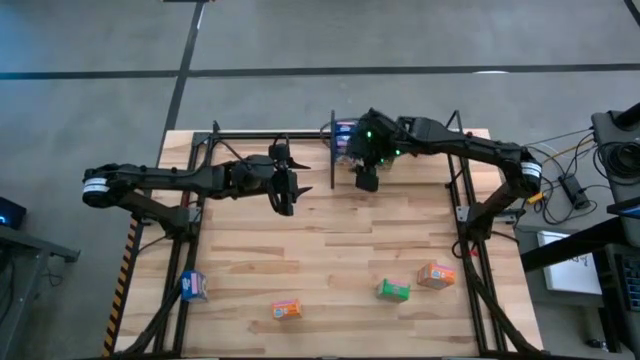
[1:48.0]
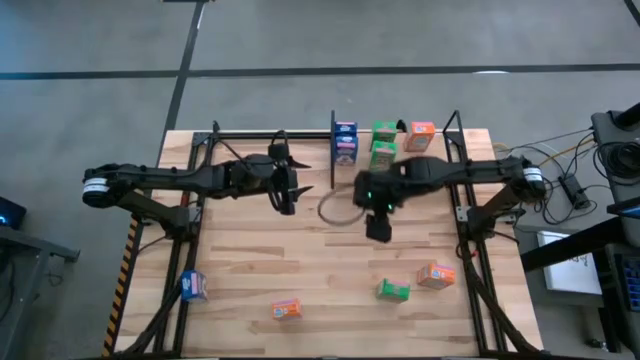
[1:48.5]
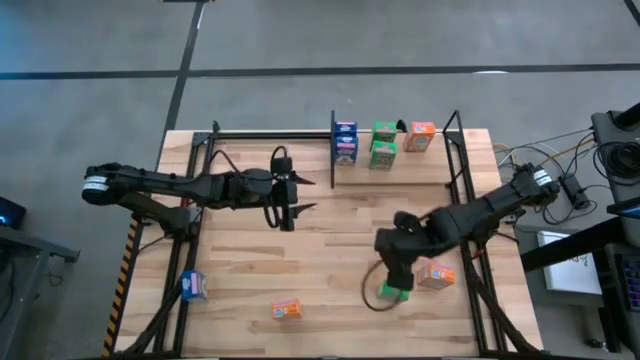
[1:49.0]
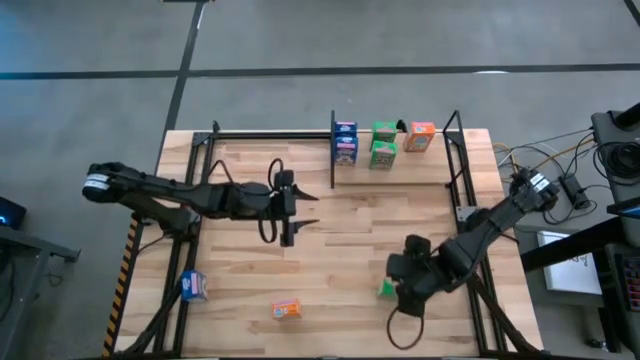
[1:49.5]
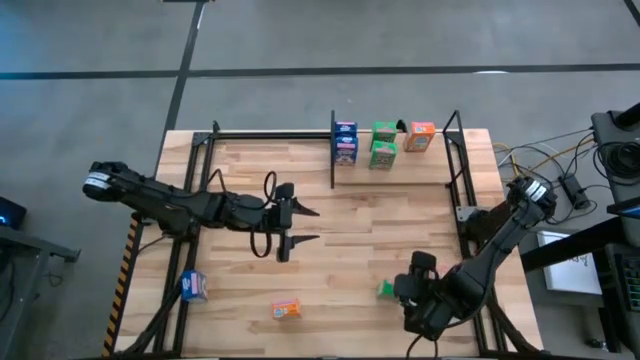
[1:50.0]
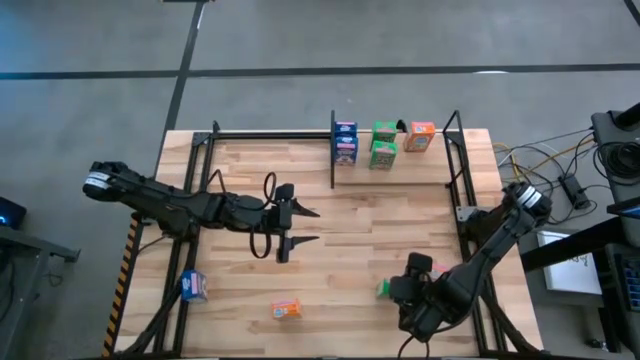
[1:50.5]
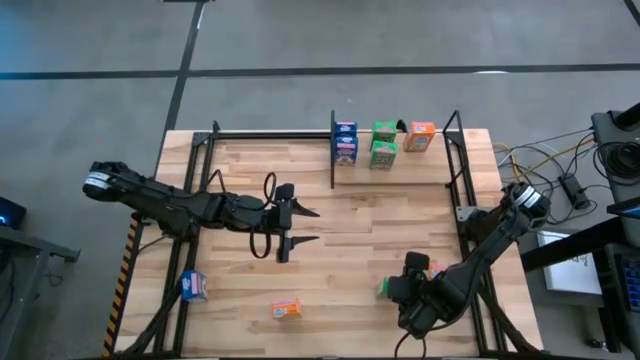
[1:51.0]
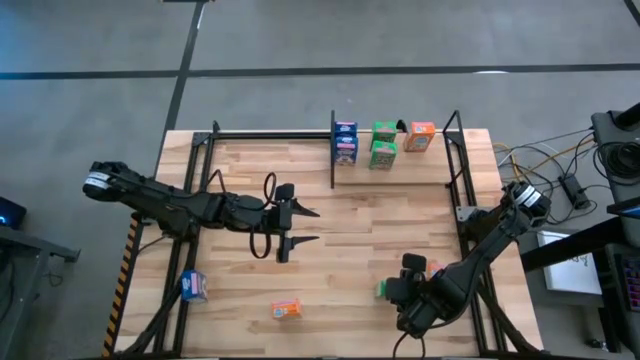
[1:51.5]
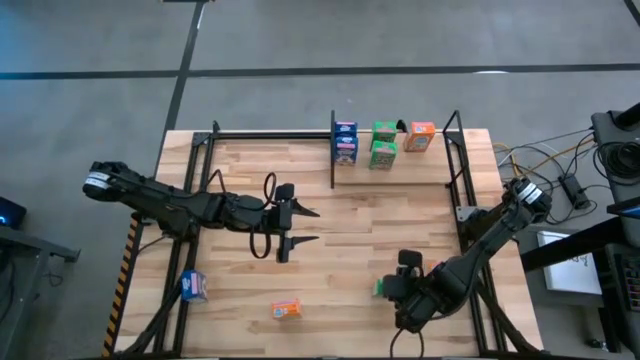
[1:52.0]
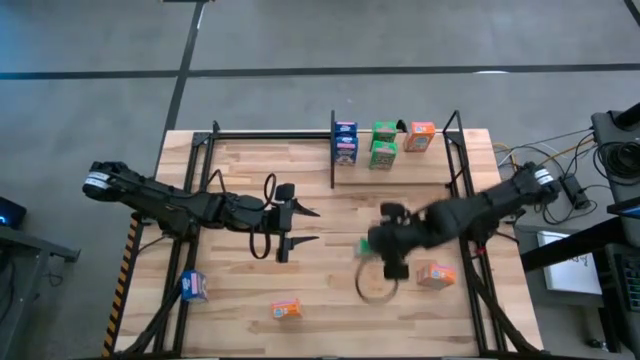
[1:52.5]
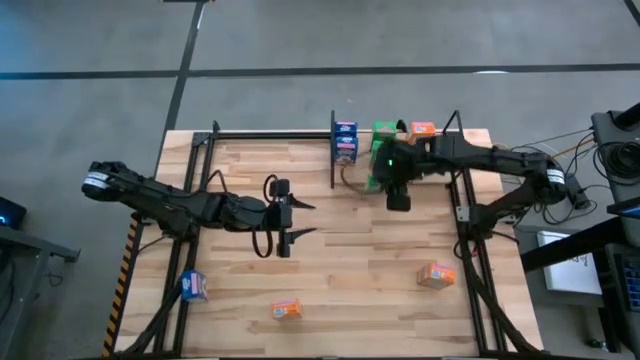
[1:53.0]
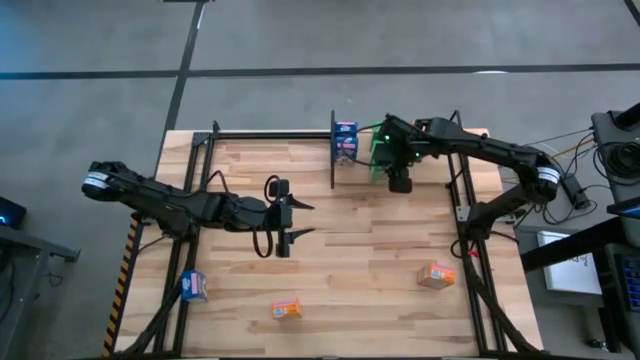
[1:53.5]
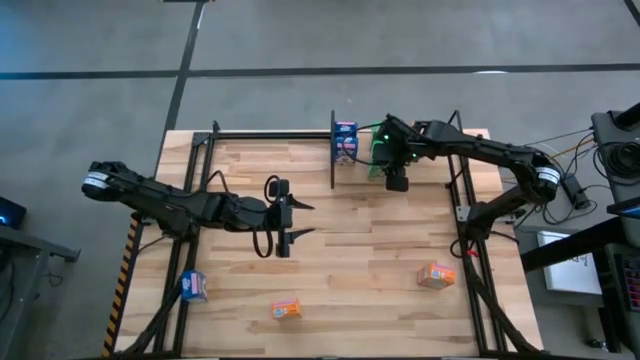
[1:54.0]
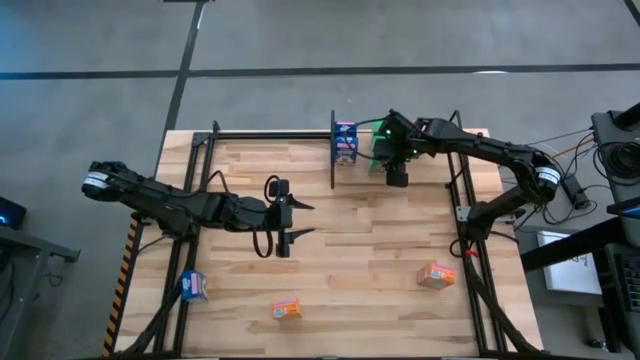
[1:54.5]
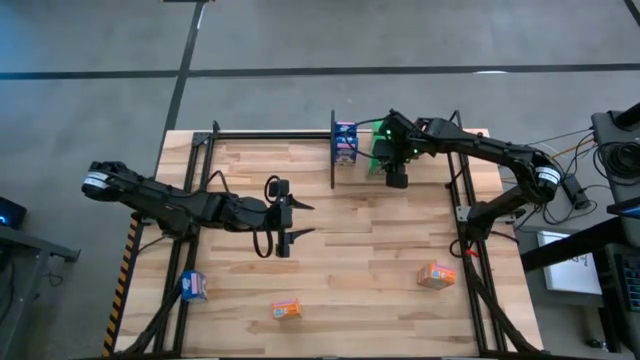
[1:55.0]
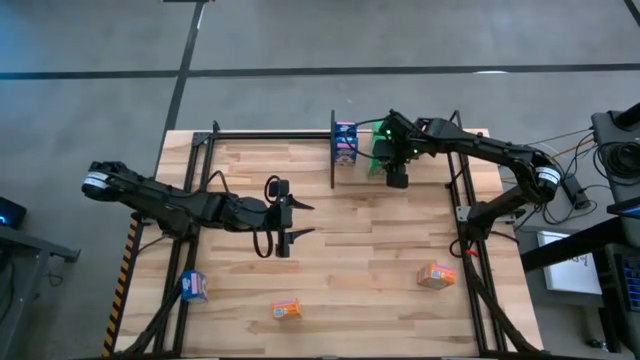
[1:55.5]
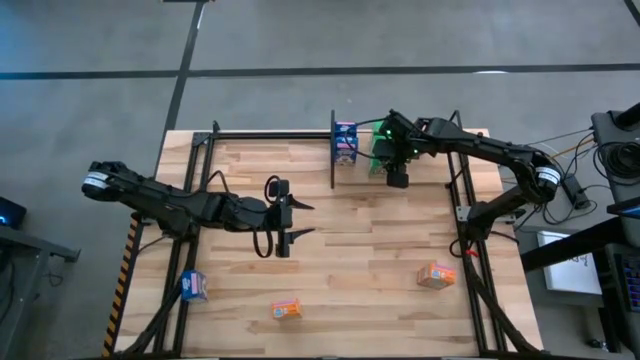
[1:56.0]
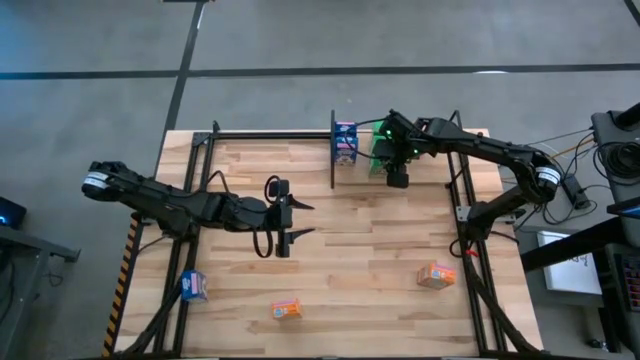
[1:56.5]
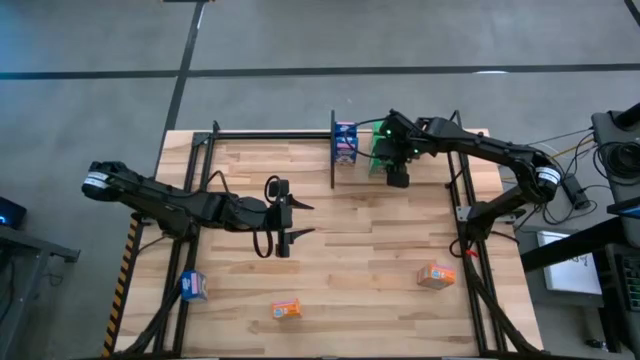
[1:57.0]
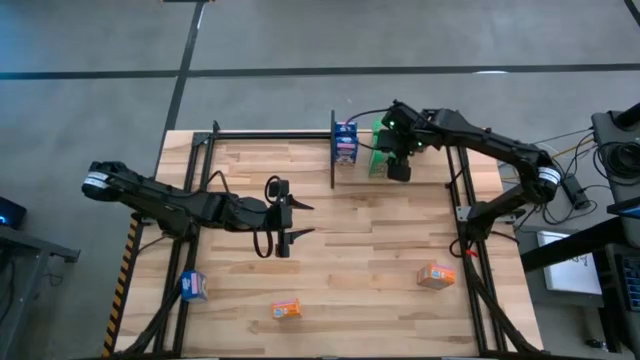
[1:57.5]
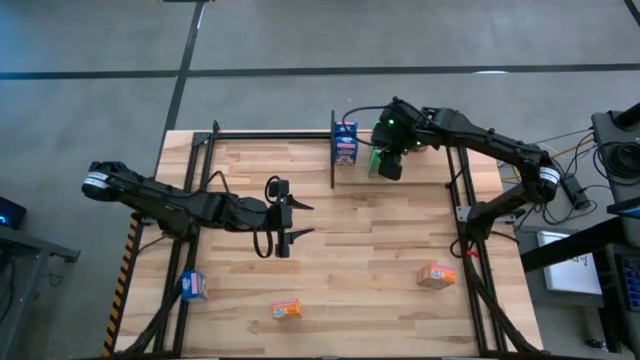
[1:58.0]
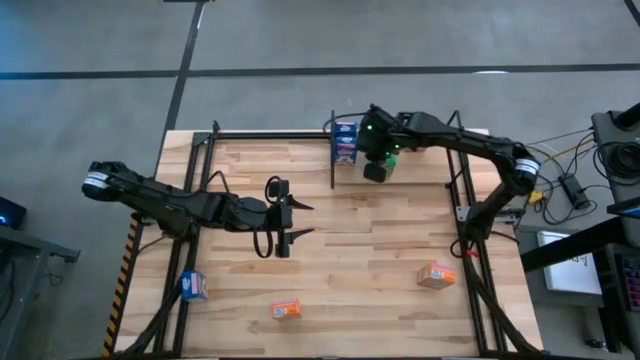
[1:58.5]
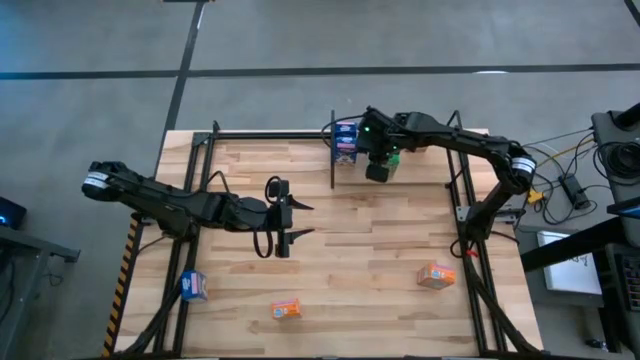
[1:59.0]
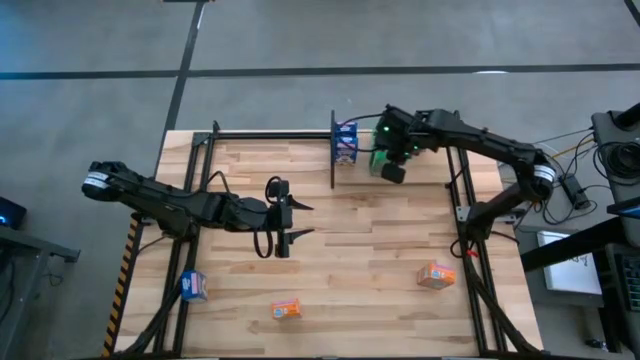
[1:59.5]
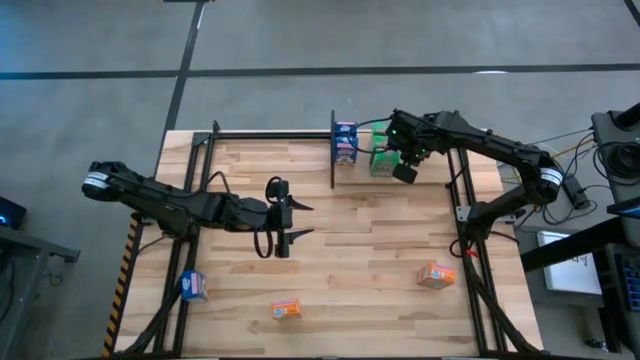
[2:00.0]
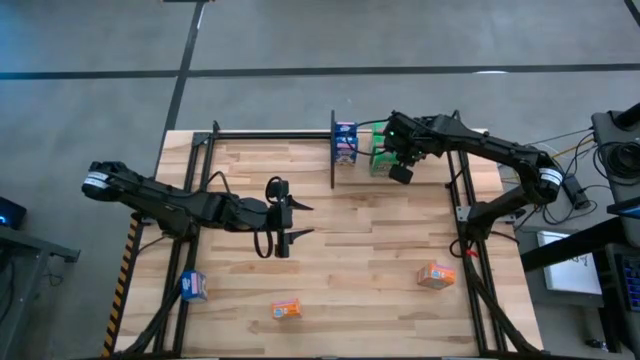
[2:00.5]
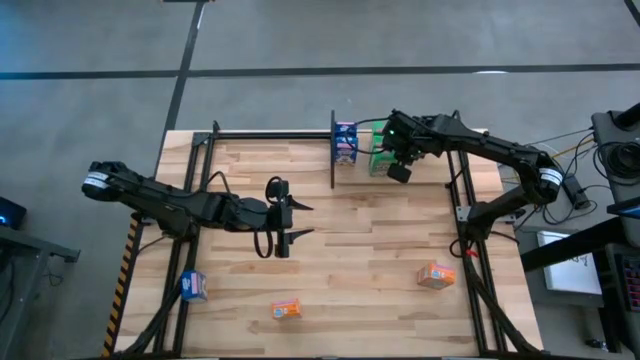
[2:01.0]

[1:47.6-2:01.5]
Task: Stack cereal on shelf
Put the green cereal box on the shelf aligned with the other green cereal box on the shelf

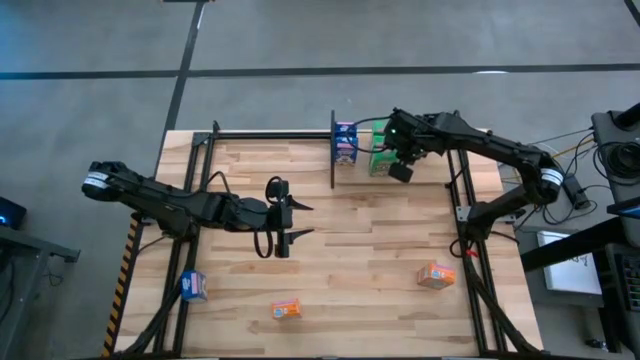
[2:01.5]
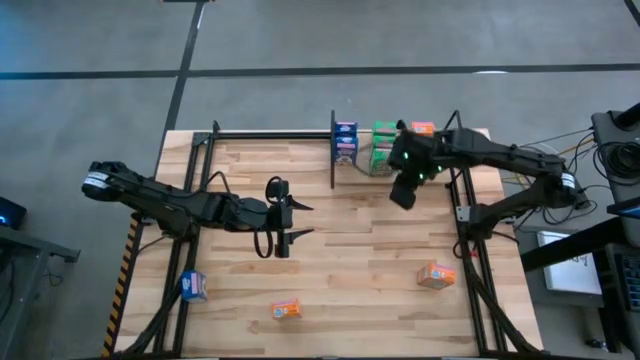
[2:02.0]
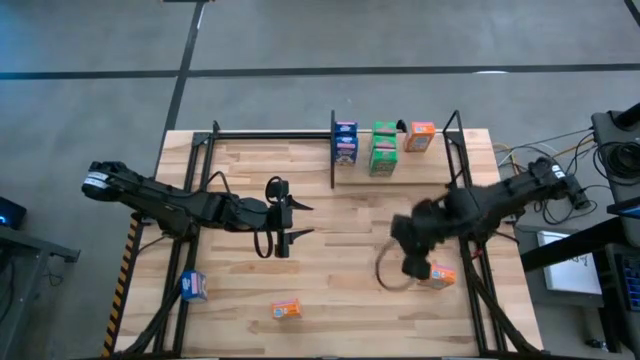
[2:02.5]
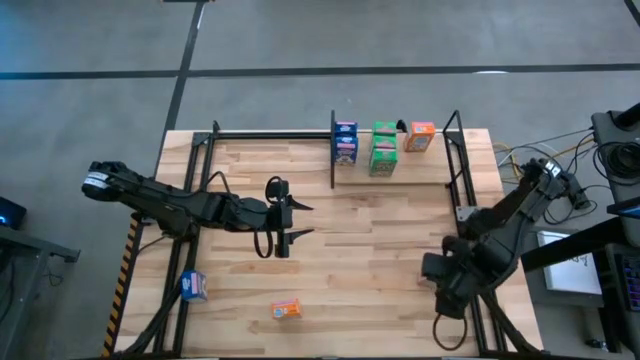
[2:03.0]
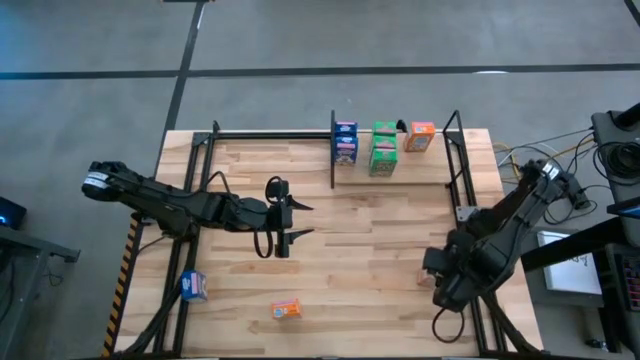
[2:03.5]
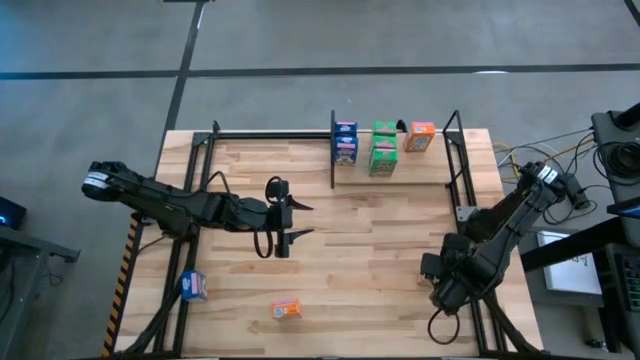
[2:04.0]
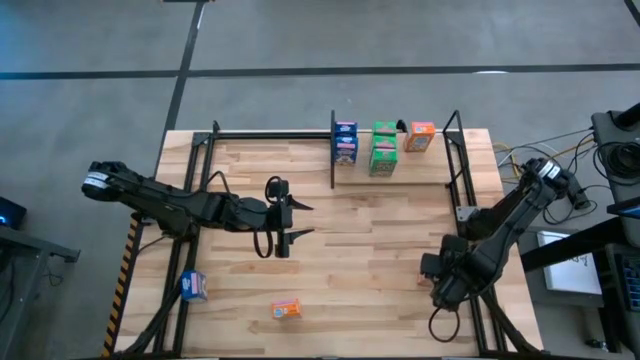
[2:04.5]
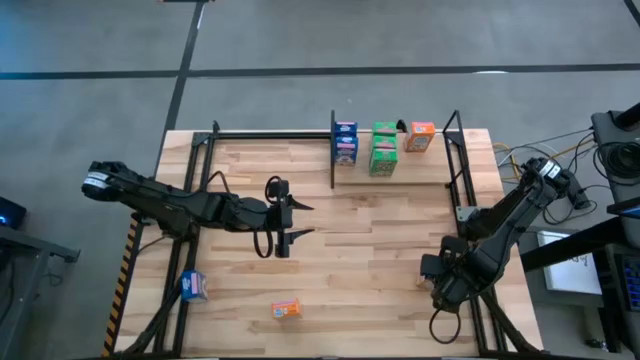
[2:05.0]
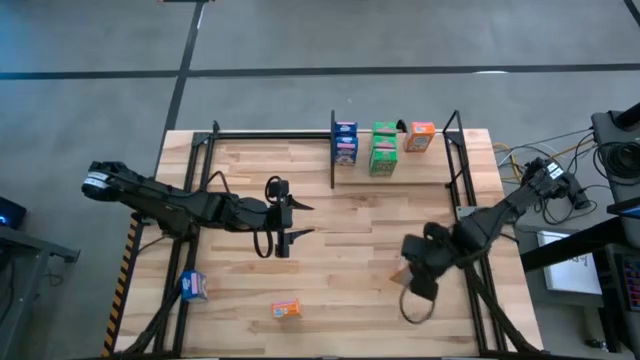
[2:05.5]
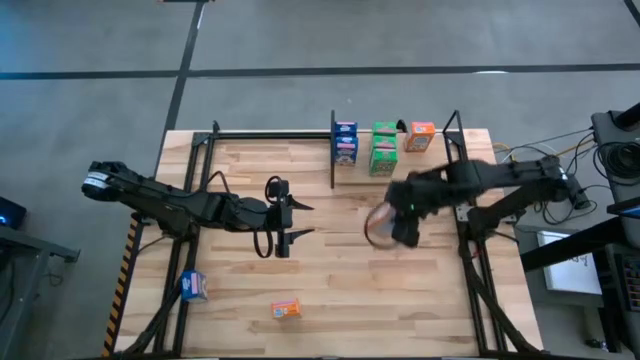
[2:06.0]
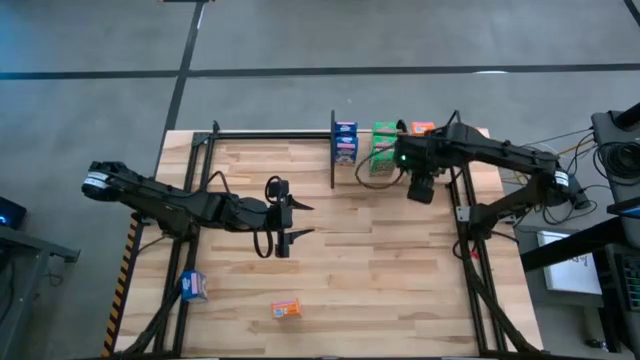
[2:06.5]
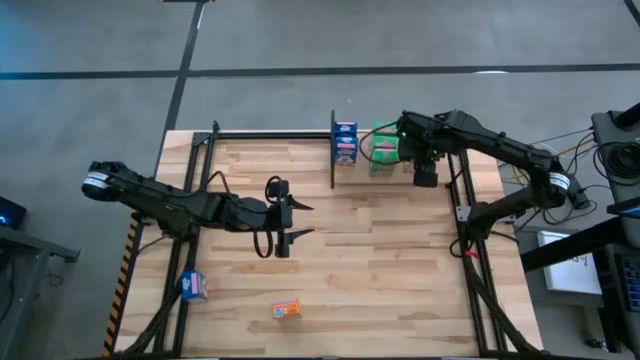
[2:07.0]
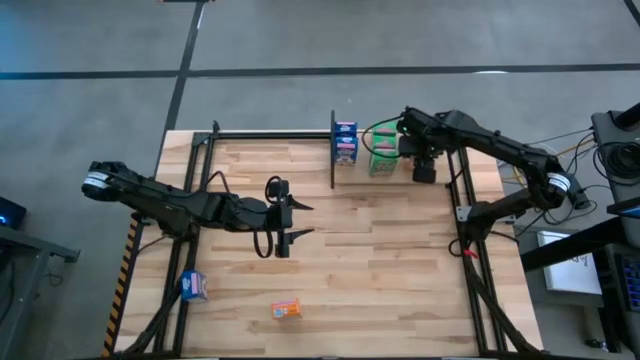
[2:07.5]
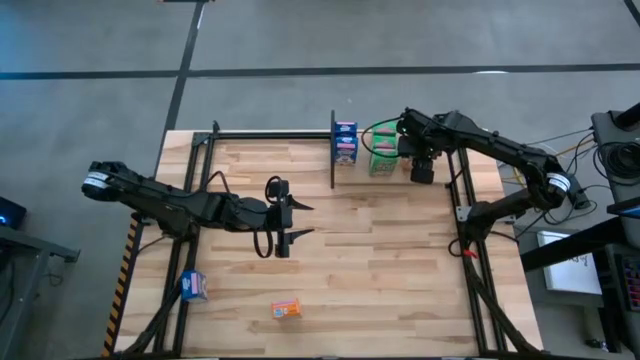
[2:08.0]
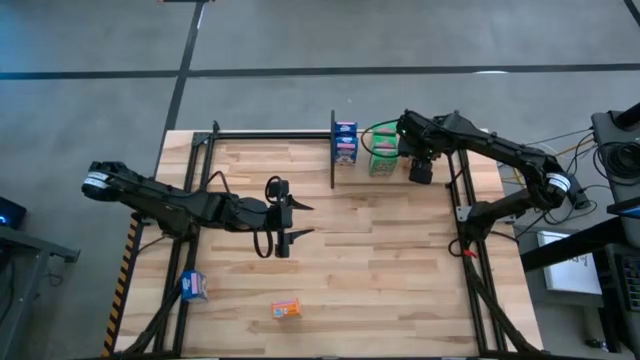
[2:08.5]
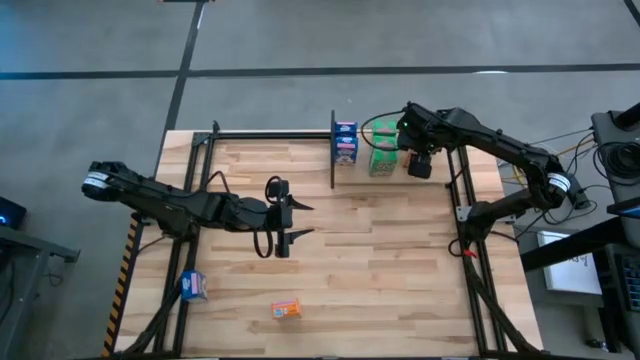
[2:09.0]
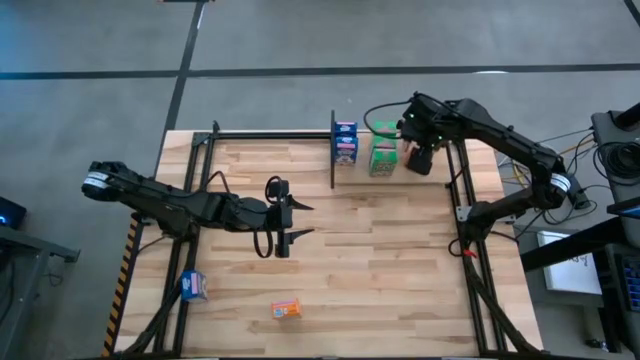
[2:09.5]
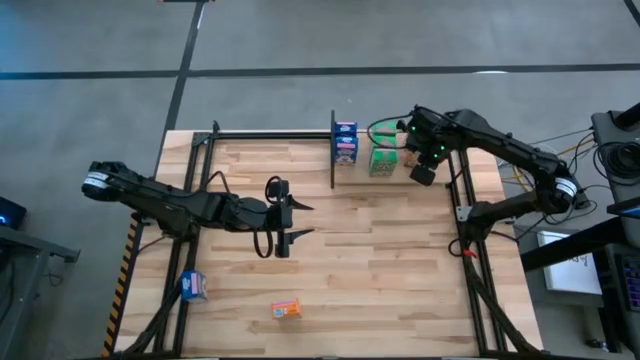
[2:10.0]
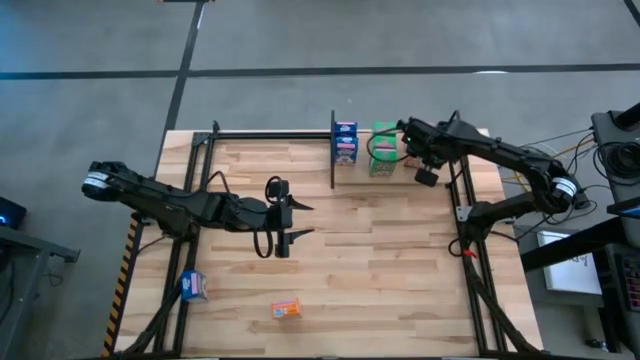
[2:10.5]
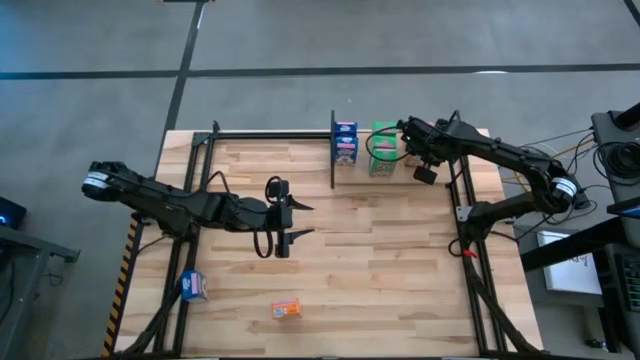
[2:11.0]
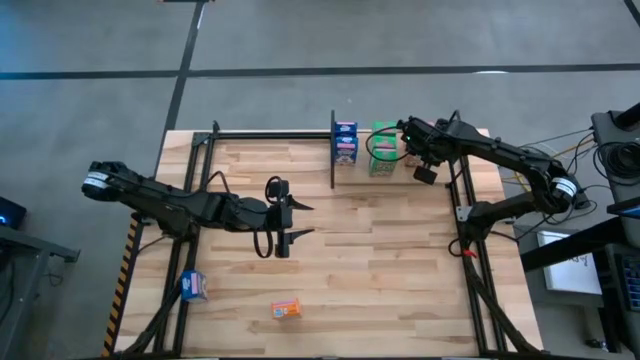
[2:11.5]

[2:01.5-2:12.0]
Put the right orange cereal box on the shelf aligned with the other orange cereal box on the shelf
